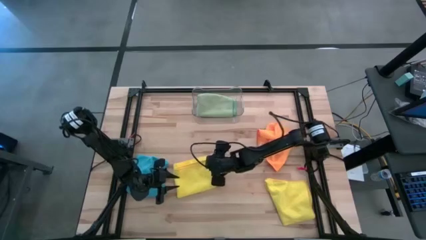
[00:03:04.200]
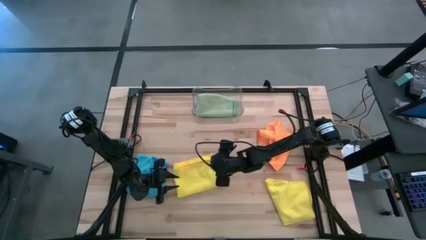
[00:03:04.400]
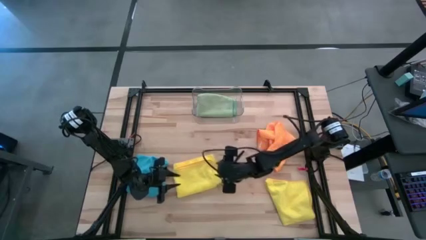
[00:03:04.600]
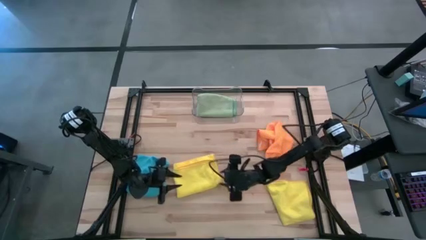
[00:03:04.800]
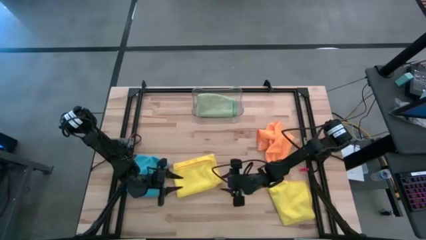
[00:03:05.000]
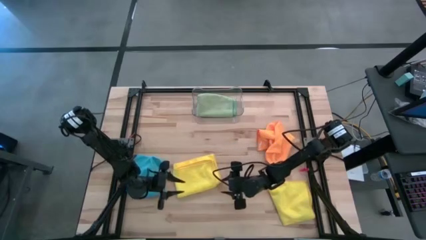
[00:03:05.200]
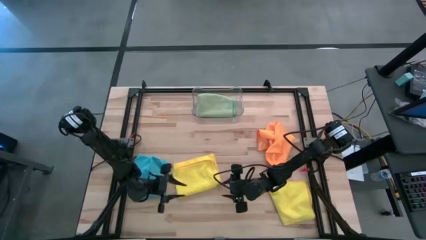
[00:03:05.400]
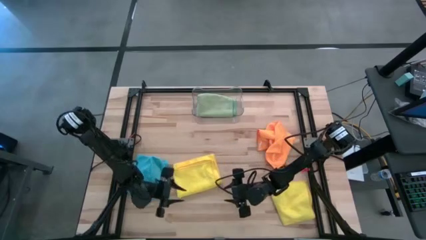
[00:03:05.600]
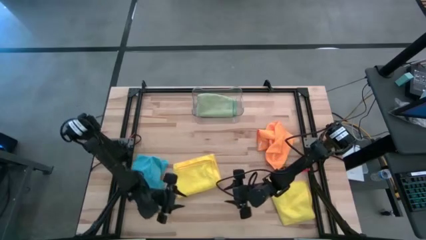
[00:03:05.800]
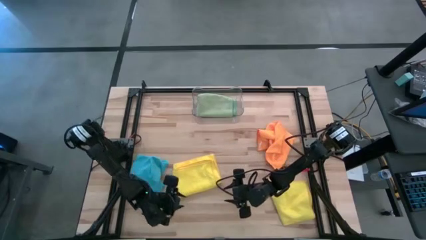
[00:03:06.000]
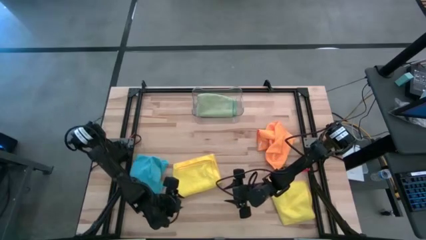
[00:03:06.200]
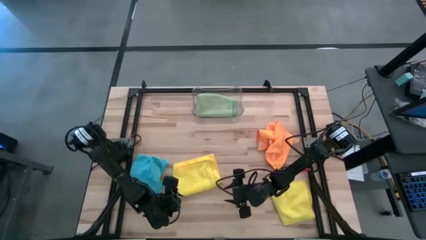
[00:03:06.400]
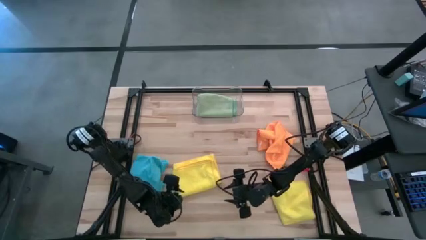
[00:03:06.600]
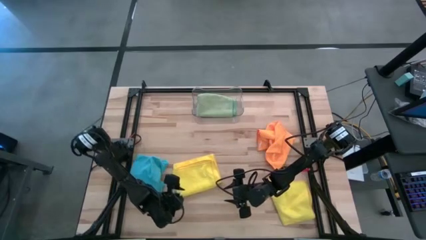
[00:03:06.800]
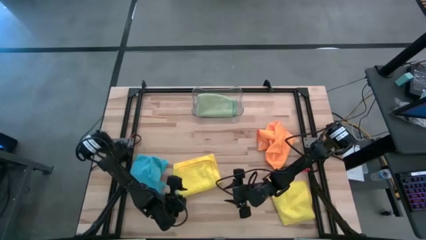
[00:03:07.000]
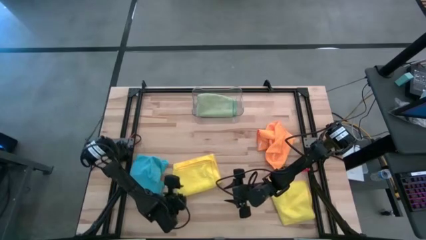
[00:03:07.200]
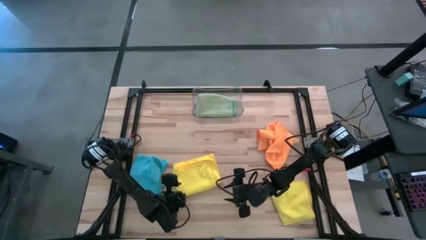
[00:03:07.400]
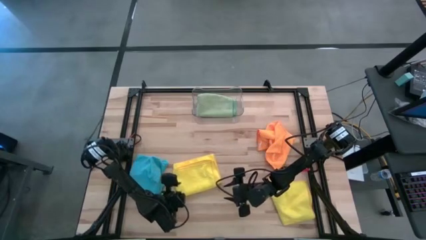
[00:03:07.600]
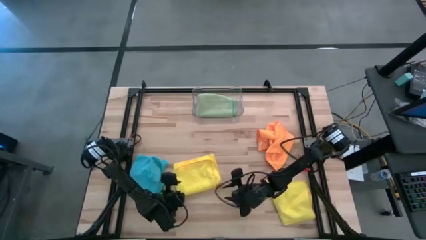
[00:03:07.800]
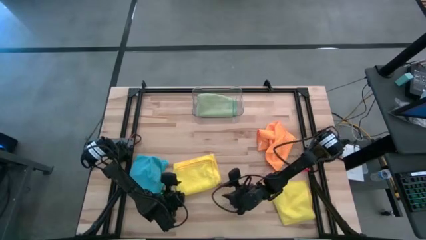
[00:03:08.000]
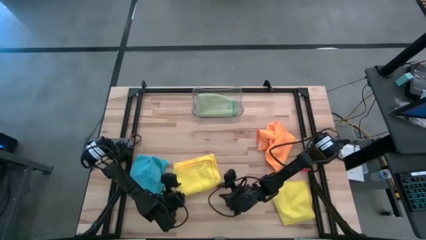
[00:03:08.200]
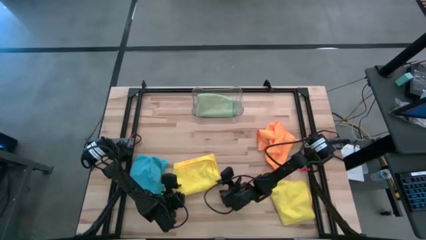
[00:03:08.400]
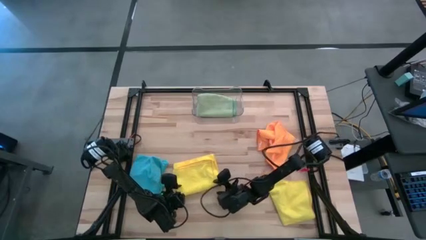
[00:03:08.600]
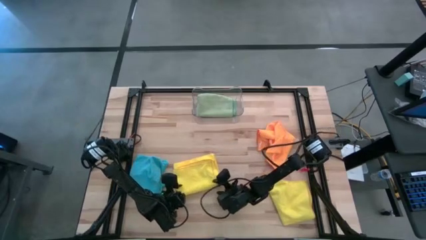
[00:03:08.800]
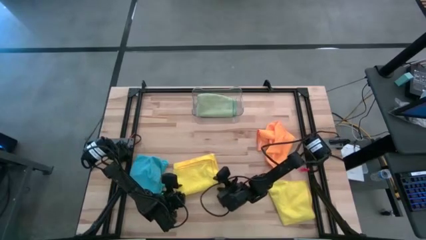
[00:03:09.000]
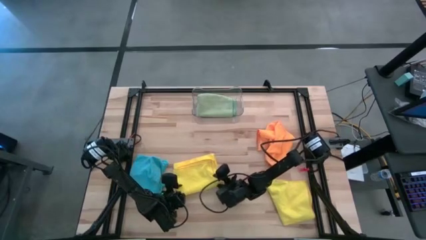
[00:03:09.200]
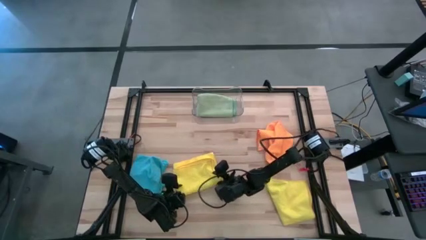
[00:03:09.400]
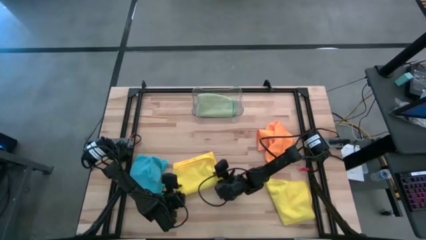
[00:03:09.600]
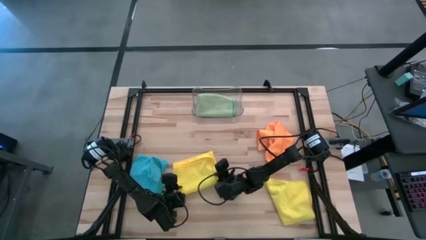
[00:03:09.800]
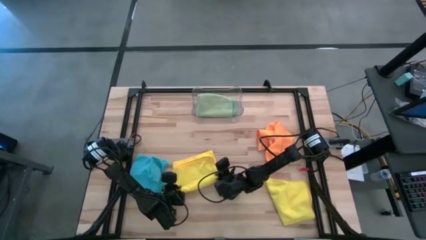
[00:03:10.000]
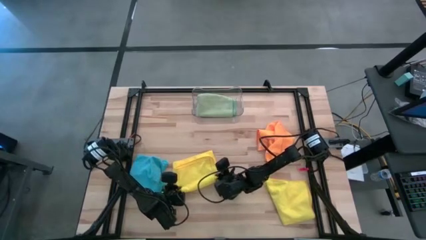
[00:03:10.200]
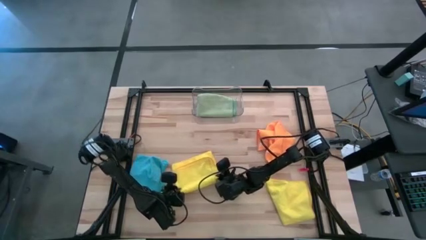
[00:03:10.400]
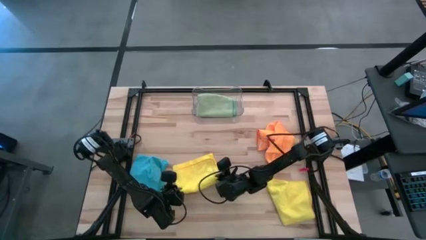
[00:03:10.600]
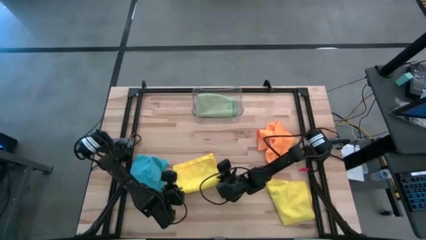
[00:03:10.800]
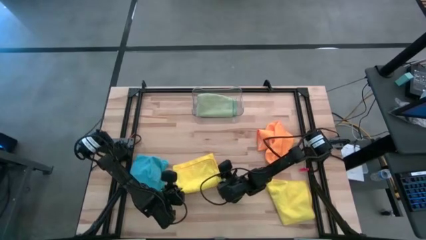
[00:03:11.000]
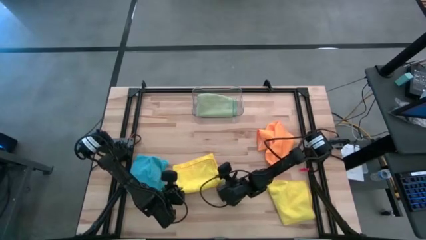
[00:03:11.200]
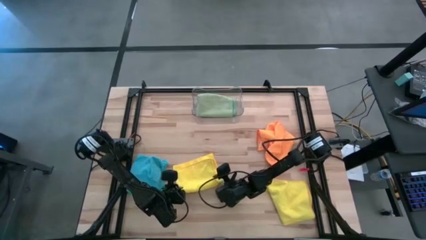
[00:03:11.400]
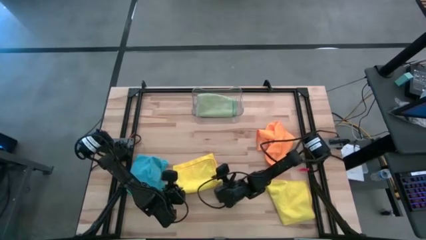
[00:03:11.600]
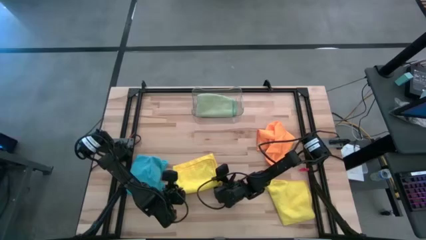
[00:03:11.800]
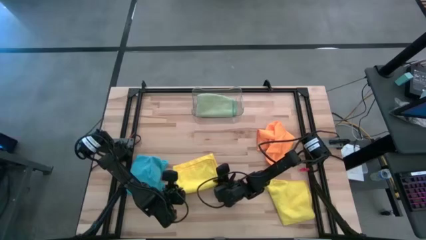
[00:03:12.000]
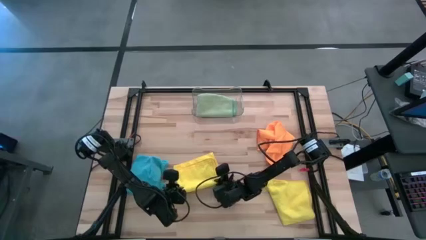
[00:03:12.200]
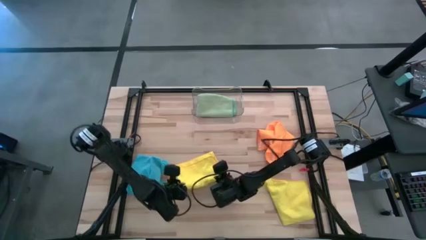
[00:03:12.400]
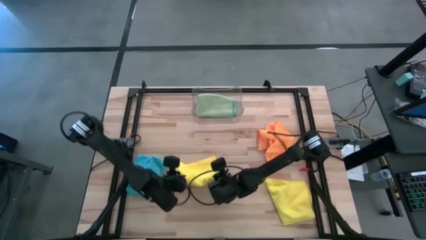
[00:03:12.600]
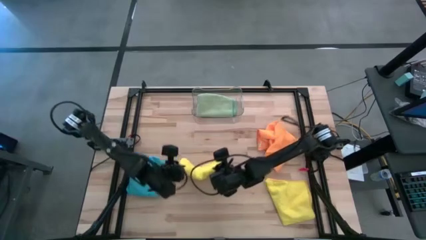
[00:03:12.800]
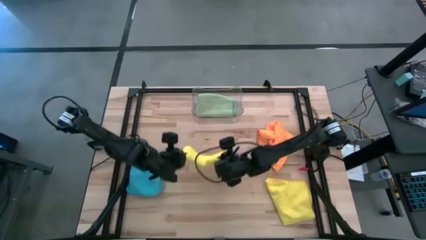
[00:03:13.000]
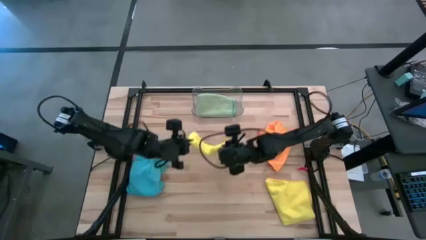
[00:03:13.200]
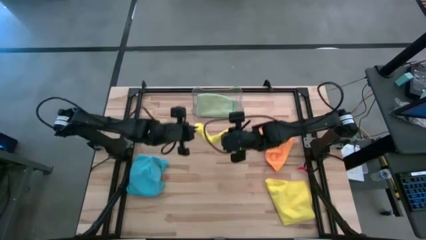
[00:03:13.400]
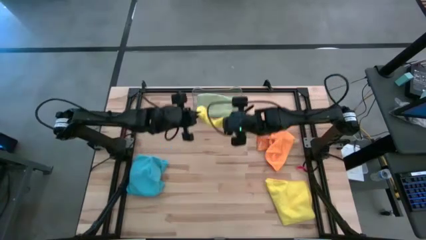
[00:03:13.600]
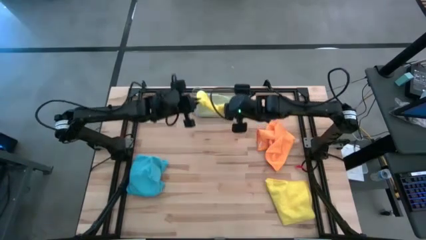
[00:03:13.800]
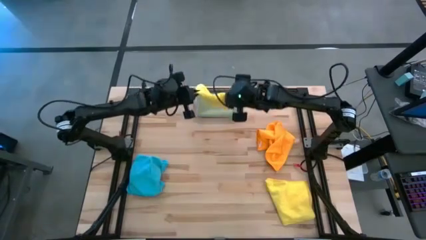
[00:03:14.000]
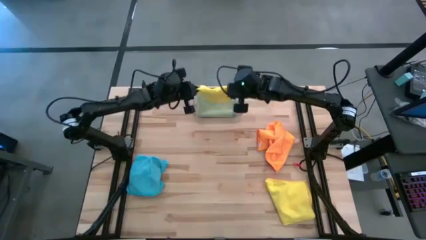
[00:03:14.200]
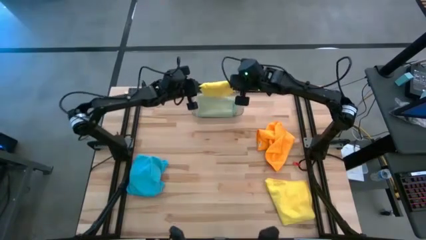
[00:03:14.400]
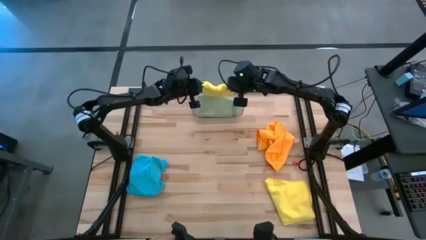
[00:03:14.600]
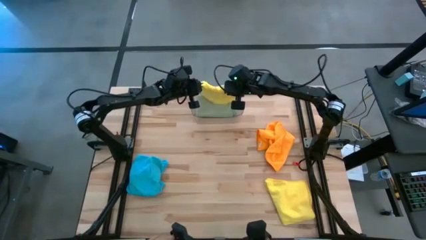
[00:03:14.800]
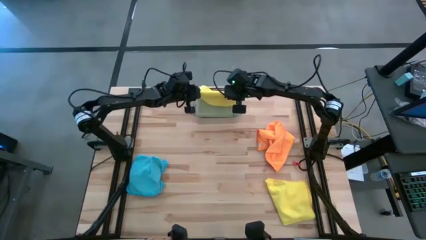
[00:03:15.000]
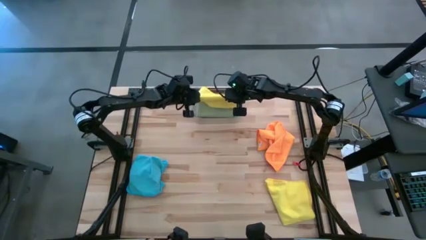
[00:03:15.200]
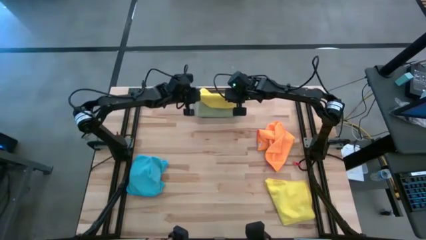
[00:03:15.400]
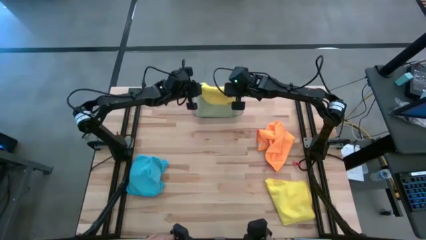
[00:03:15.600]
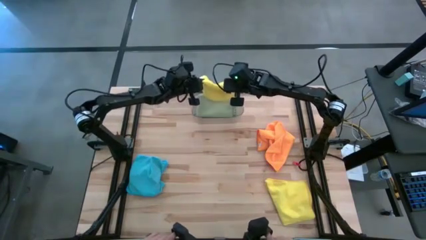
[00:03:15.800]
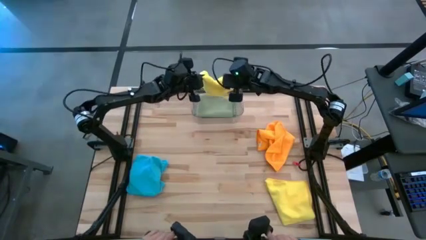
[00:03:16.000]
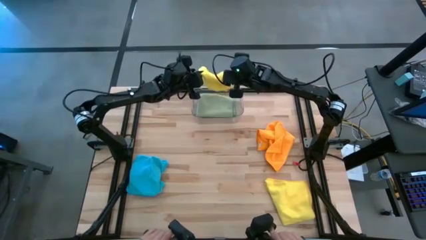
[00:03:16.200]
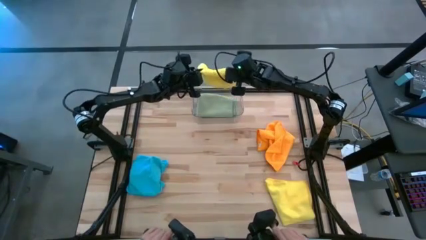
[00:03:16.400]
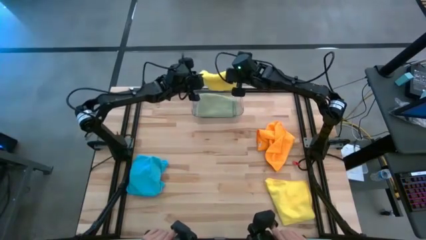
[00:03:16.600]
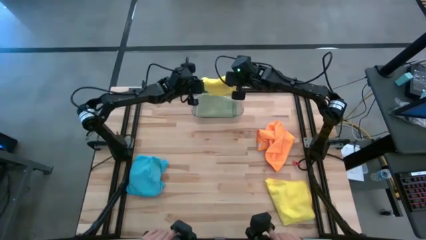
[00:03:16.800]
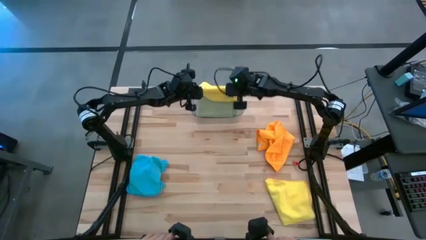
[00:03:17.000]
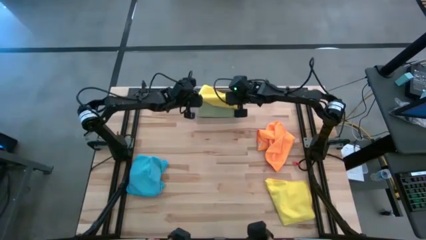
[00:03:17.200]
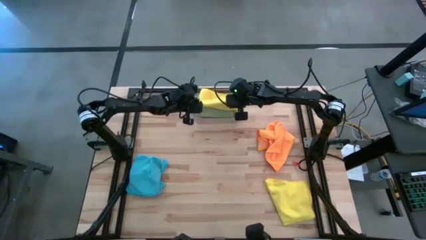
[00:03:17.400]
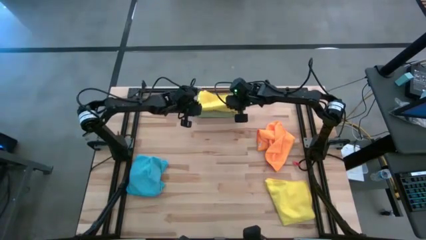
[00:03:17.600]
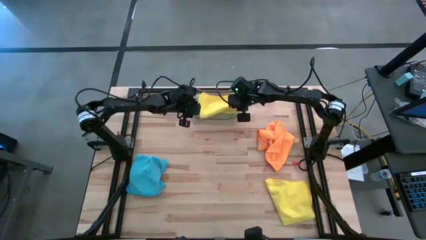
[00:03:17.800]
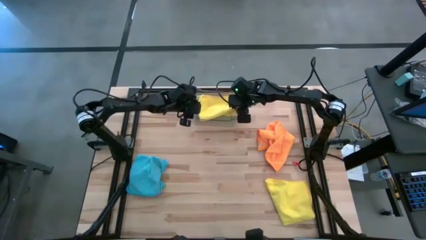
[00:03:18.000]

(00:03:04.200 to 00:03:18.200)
Task: Fold microfiber towels
Put the top yellow microfiber cloth into the transparent bin
